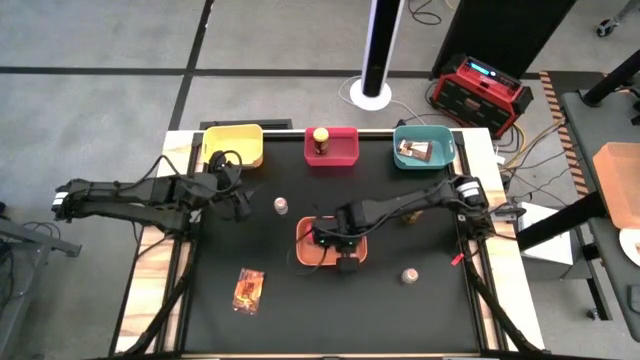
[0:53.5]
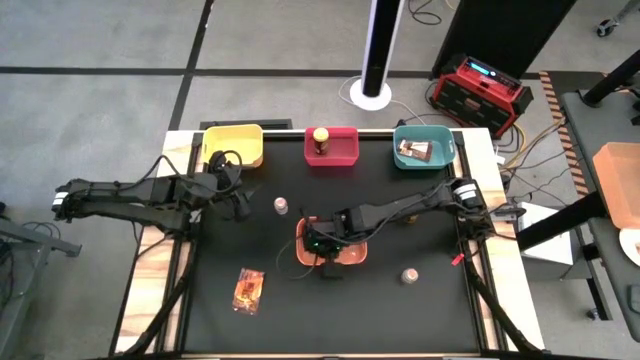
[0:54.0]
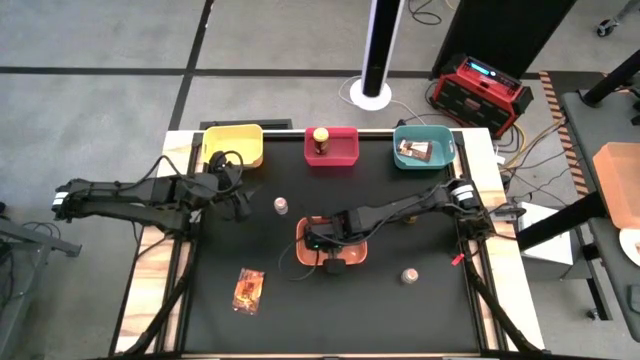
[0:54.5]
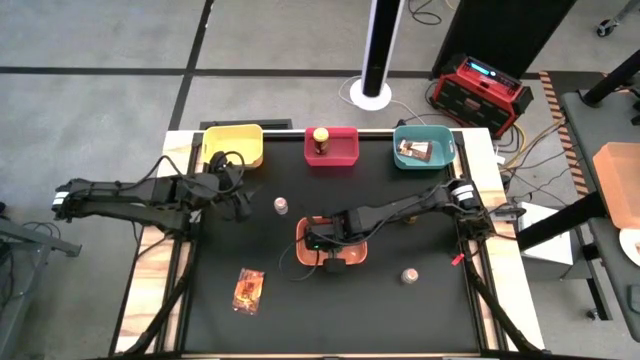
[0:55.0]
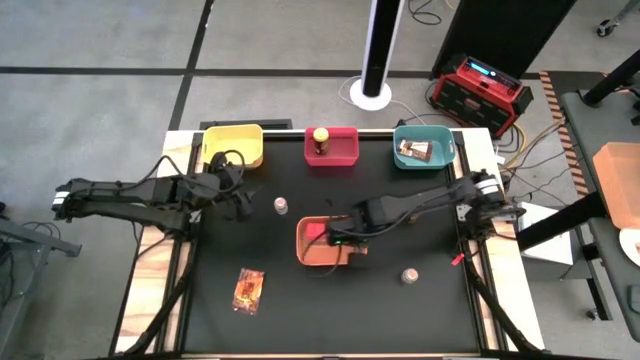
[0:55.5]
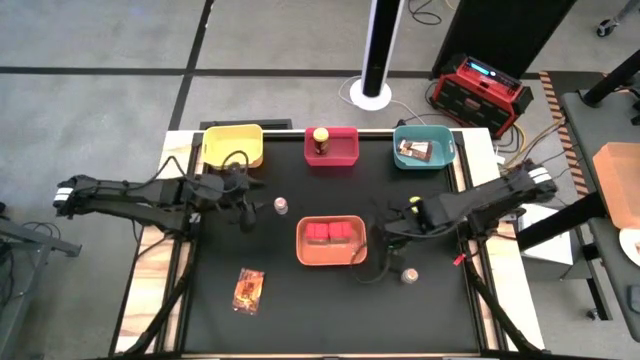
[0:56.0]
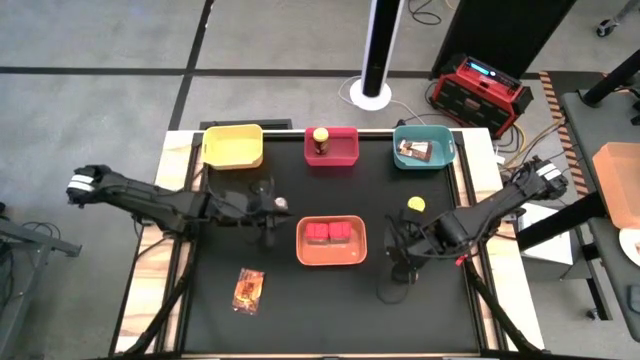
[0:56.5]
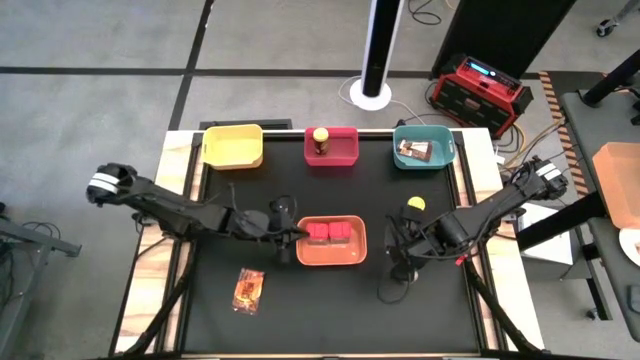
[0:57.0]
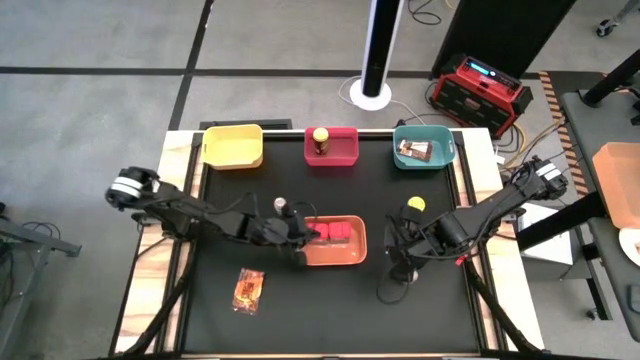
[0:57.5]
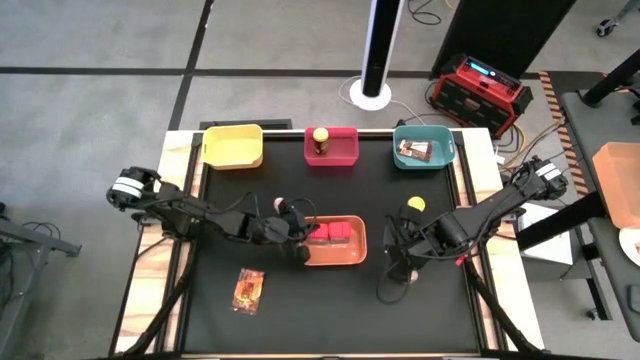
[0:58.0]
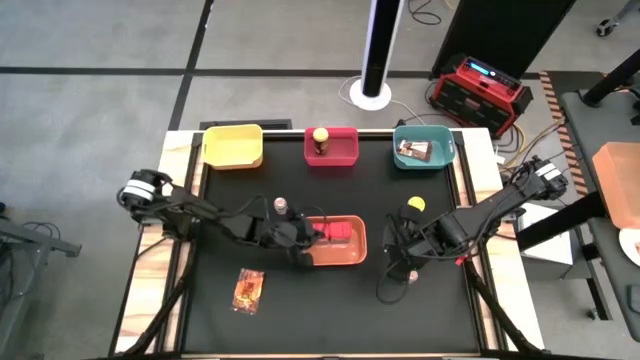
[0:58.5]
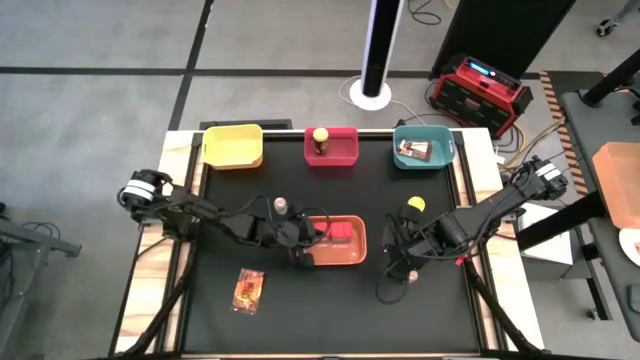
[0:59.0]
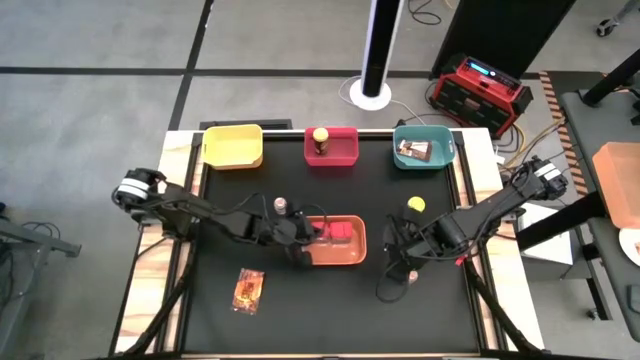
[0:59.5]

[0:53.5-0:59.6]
Task: Sort spices by type
Adjust the red seasoning can in the orange bin

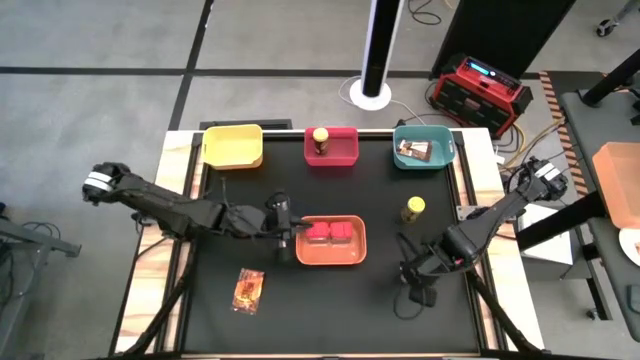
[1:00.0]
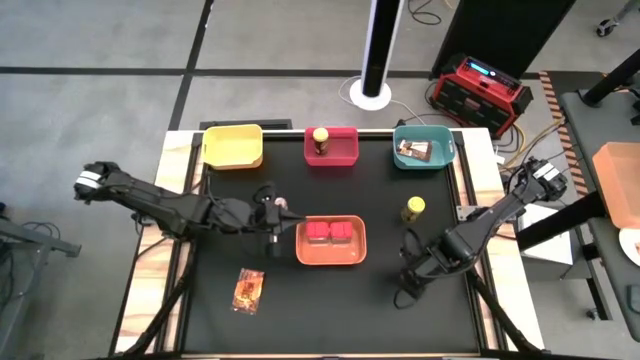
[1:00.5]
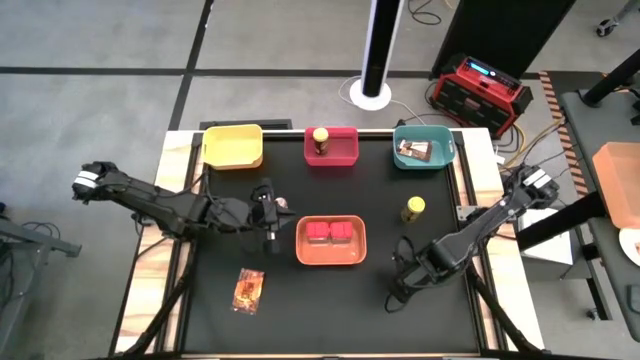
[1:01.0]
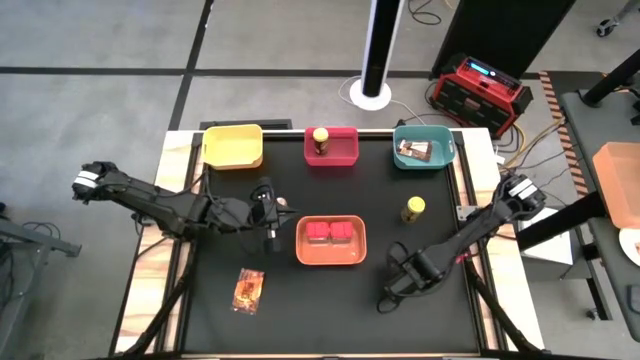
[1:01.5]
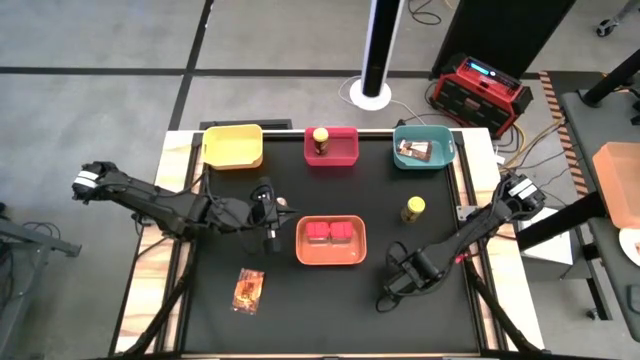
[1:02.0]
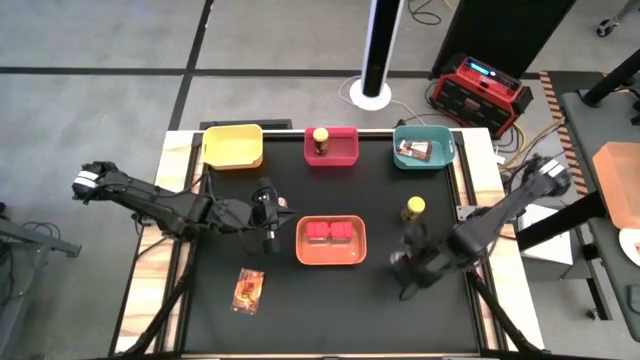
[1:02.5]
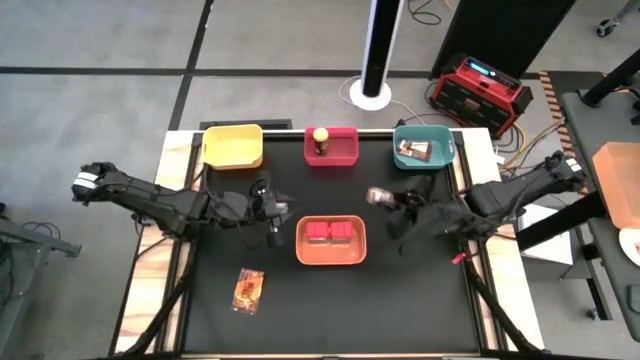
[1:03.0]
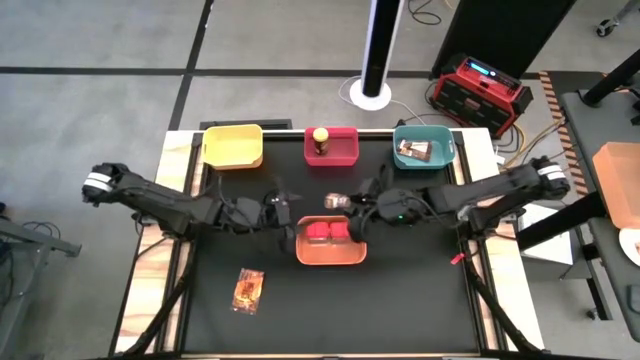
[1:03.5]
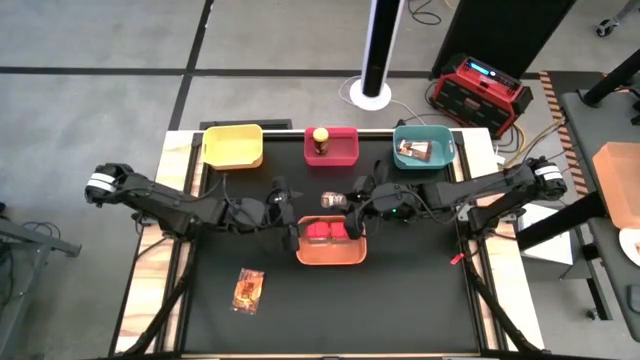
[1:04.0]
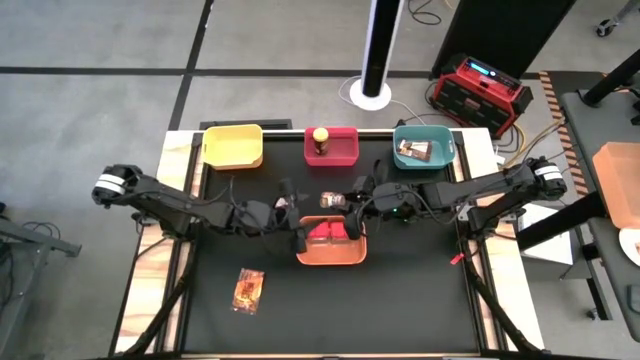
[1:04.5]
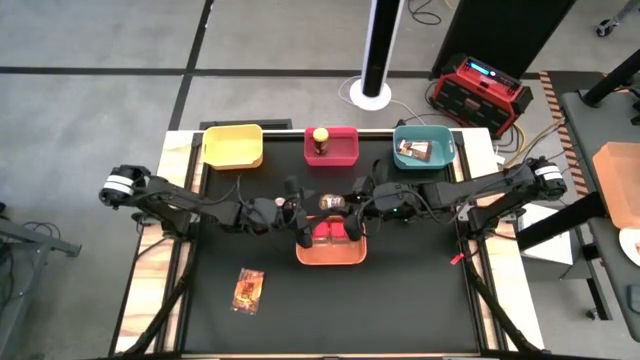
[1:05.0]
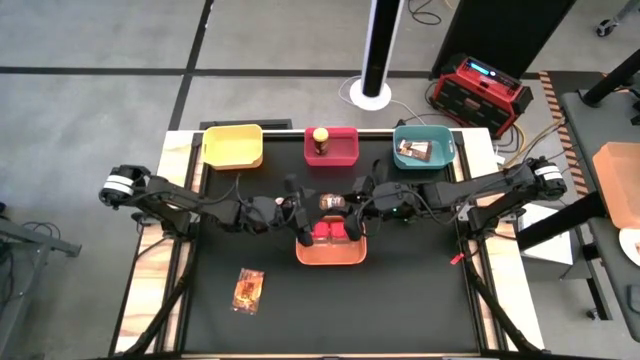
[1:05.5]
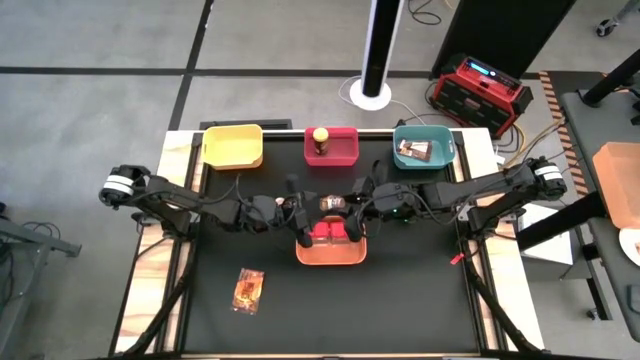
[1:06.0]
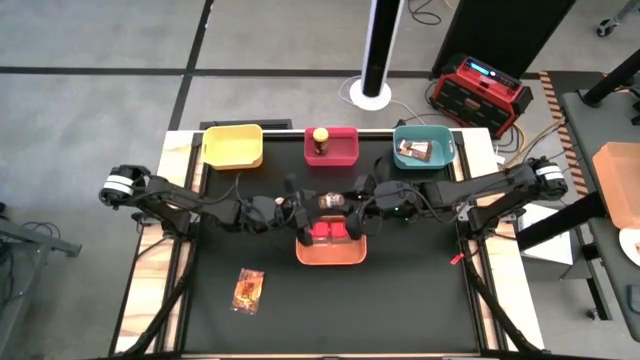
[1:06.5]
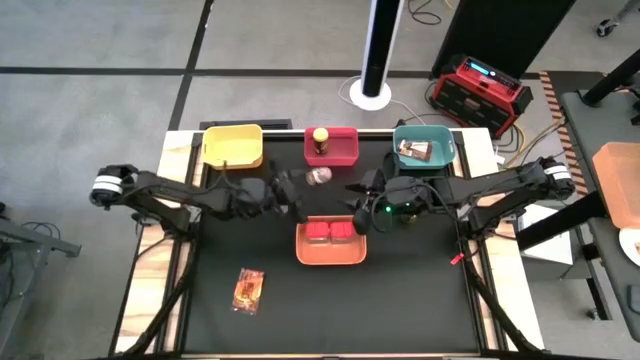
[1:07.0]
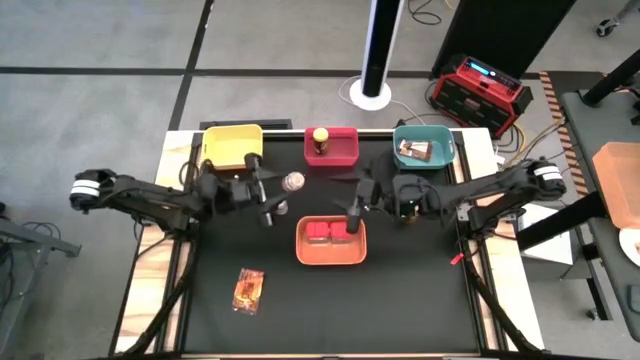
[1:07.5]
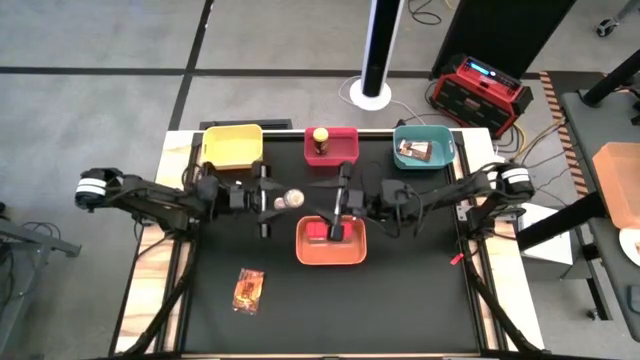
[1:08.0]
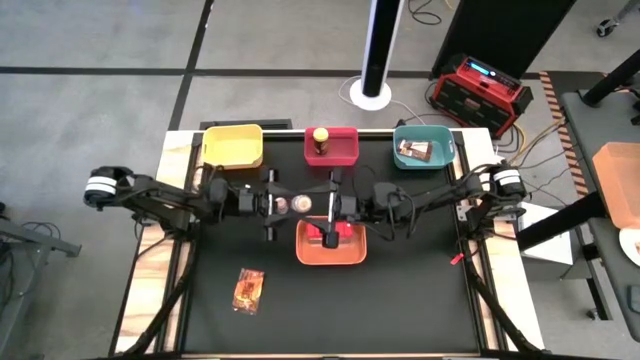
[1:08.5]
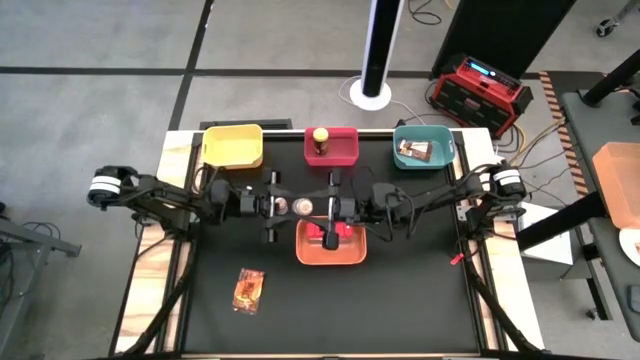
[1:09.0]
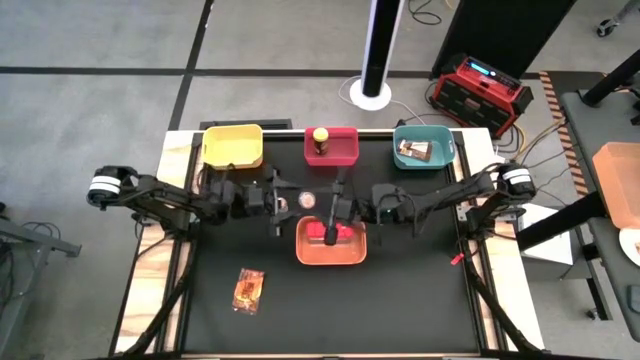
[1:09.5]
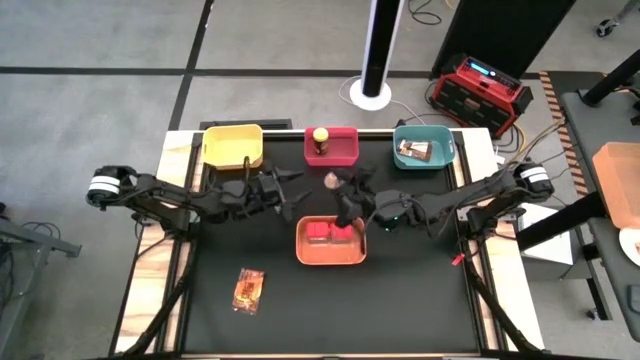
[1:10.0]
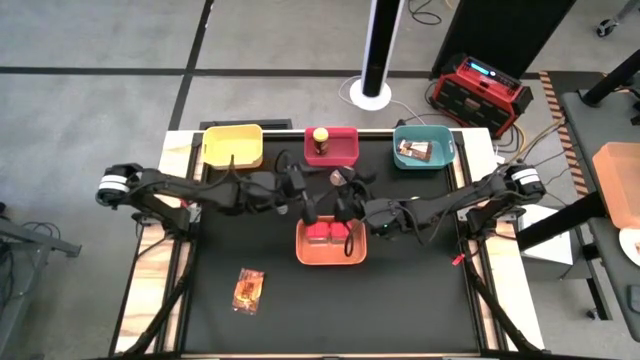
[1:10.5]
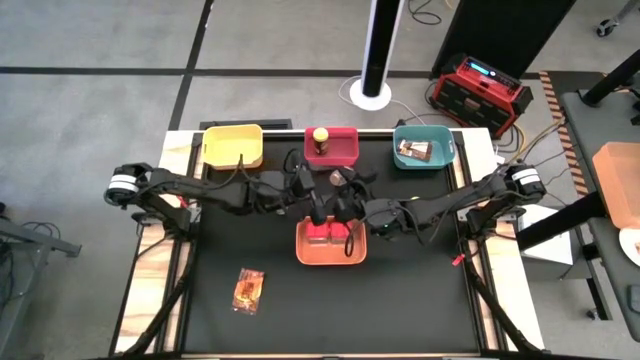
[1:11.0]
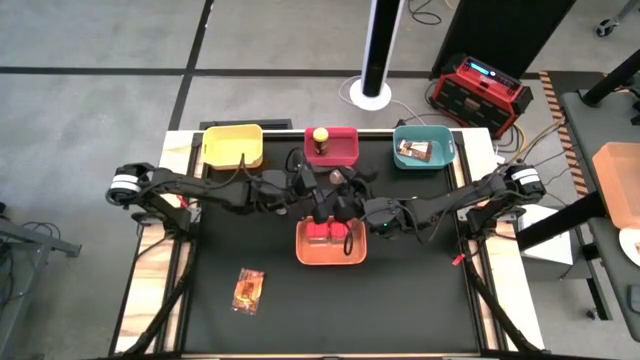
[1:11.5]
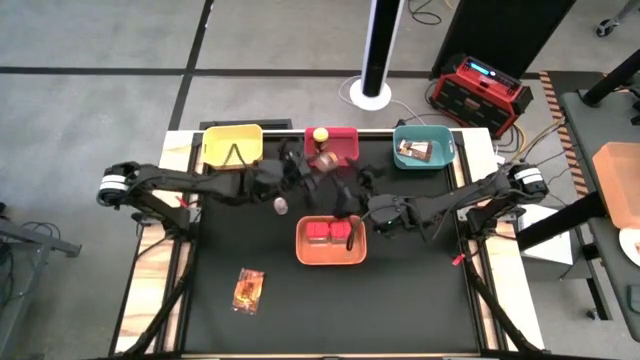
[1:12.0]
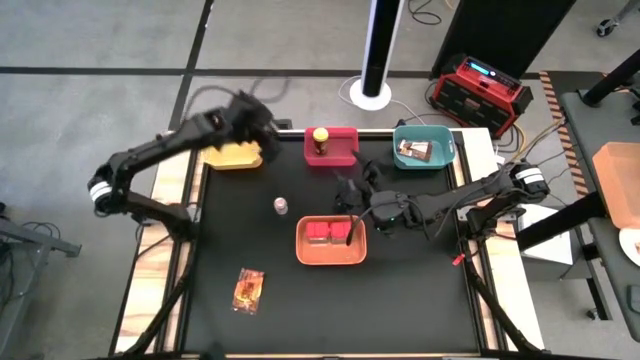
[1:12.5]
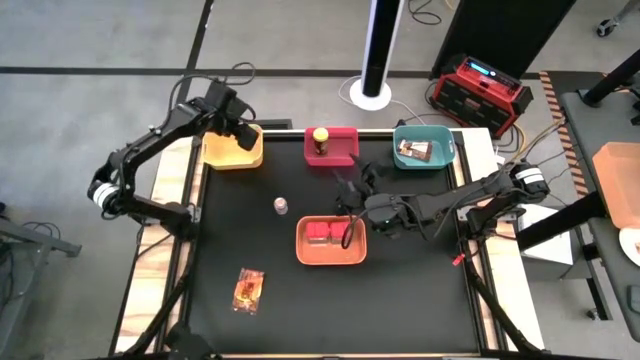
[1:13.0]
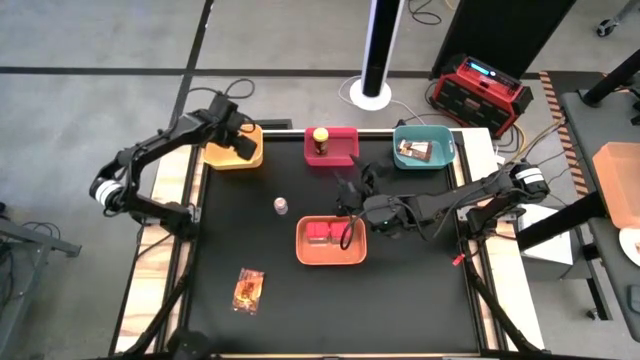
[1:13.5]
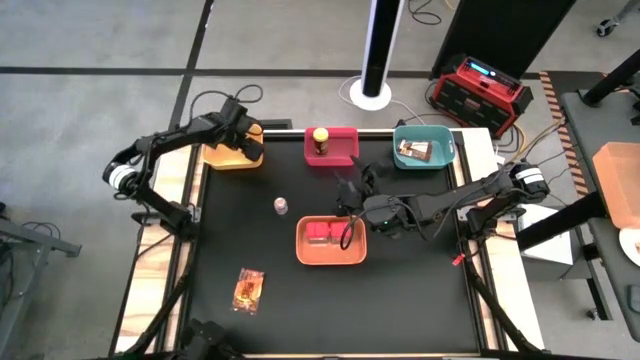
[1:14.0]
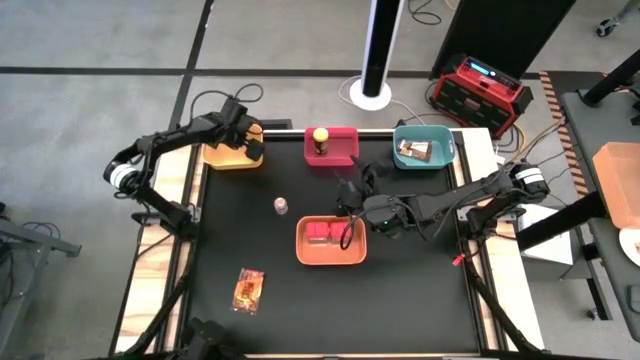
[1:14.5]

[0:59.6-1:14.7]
Put the transparent seasoning bottle into the yellow bin

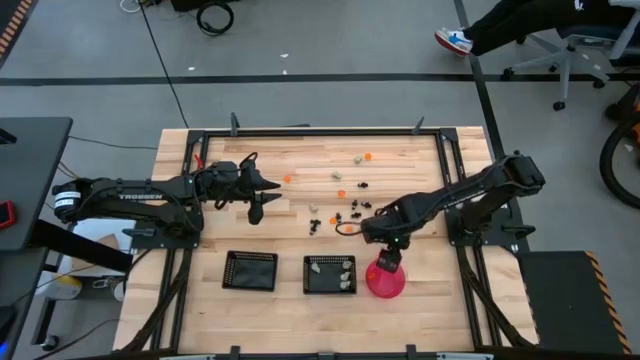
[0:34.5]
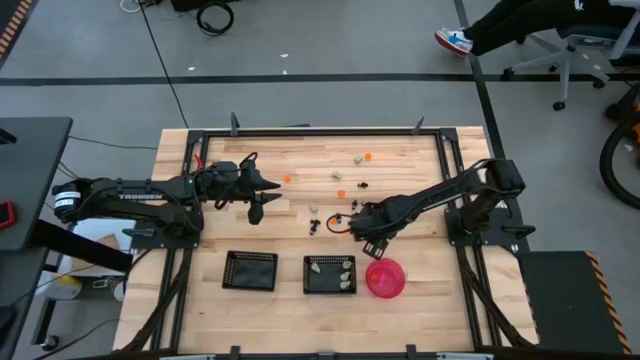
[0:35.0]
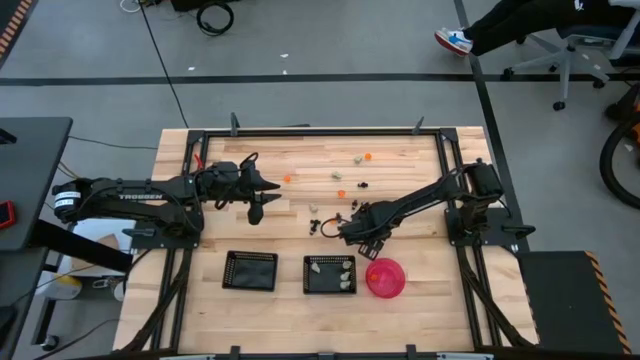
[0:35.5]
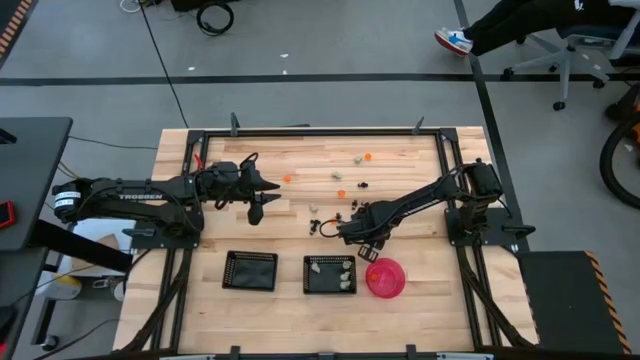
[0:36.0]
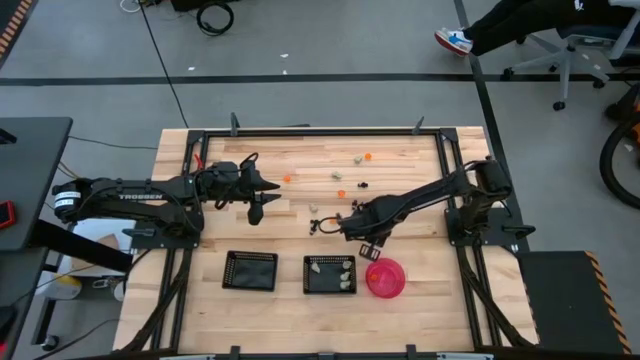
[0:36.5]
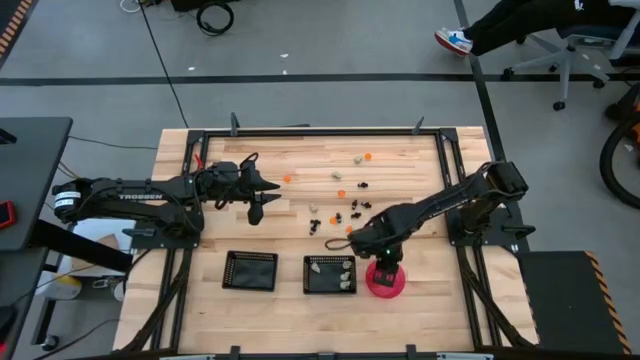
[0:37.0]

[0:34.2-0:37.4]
Task: Sort Halloween decoration
Put the orange pumpkin toy into the pink bowl
